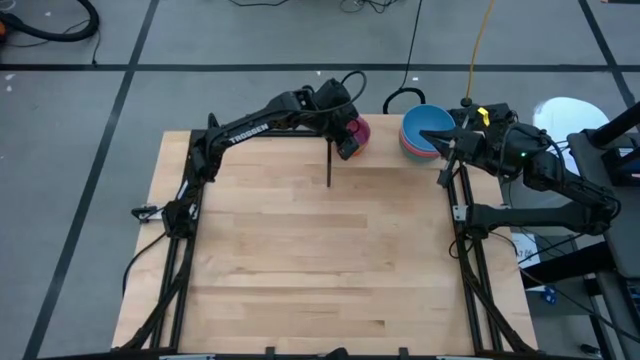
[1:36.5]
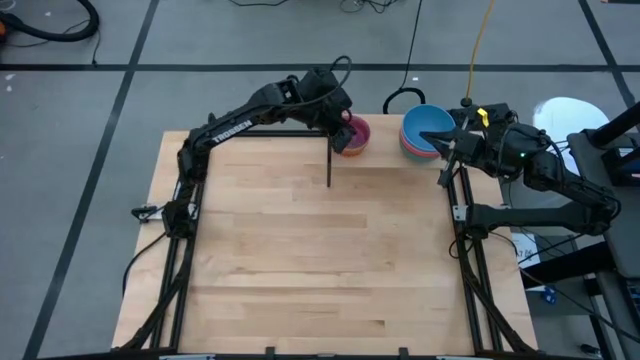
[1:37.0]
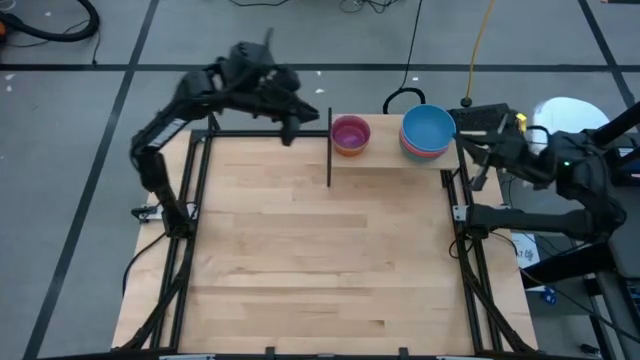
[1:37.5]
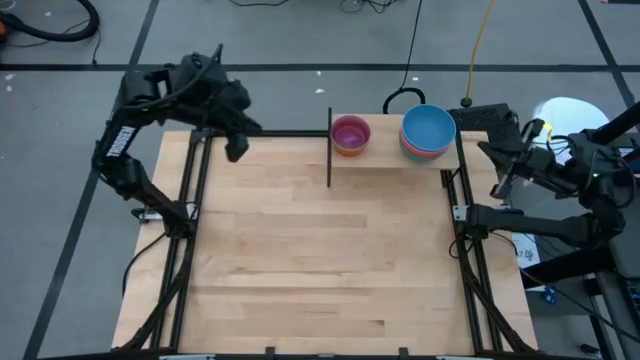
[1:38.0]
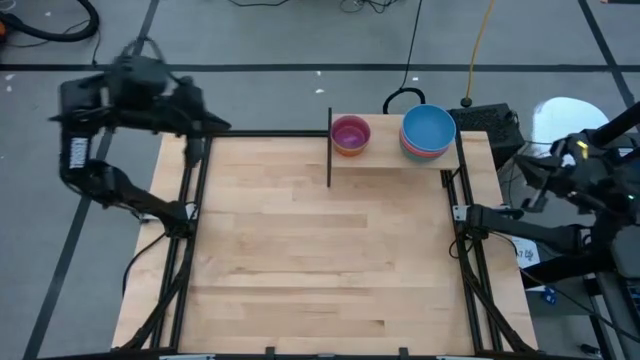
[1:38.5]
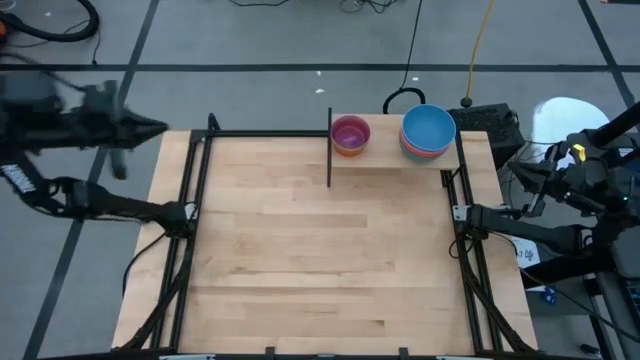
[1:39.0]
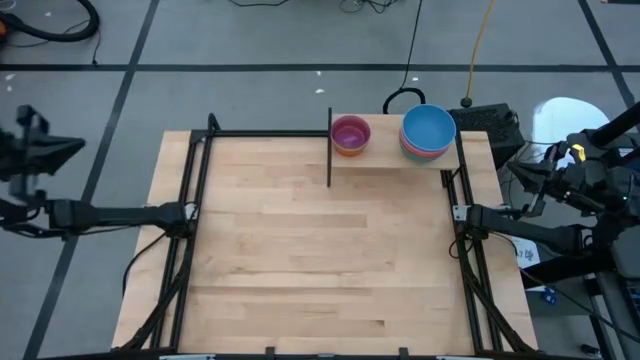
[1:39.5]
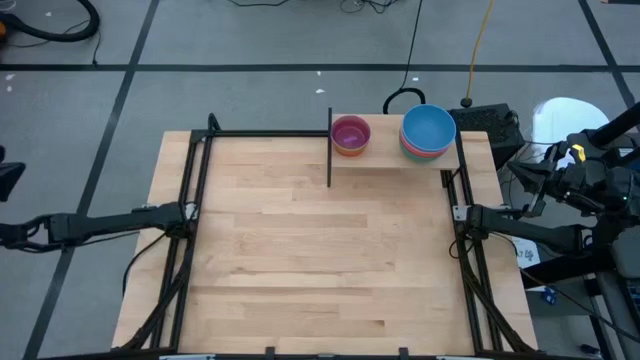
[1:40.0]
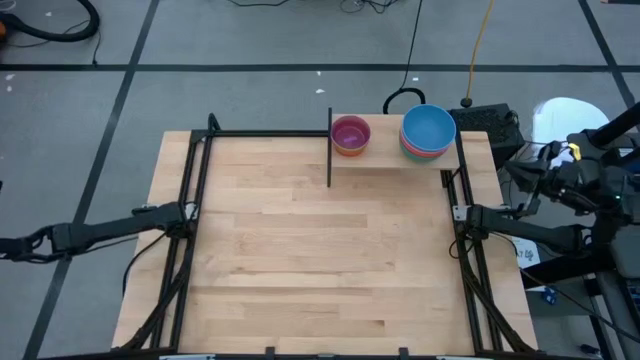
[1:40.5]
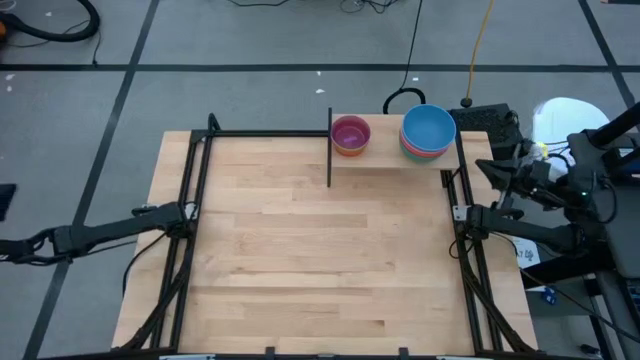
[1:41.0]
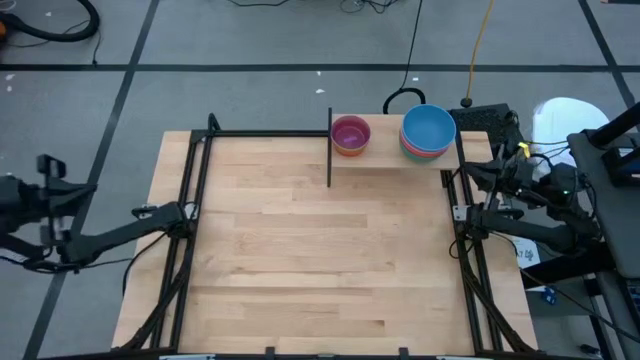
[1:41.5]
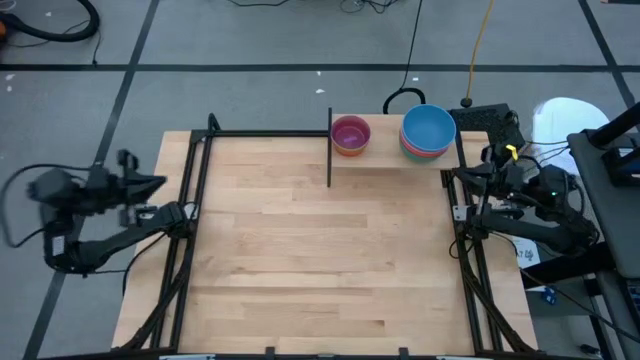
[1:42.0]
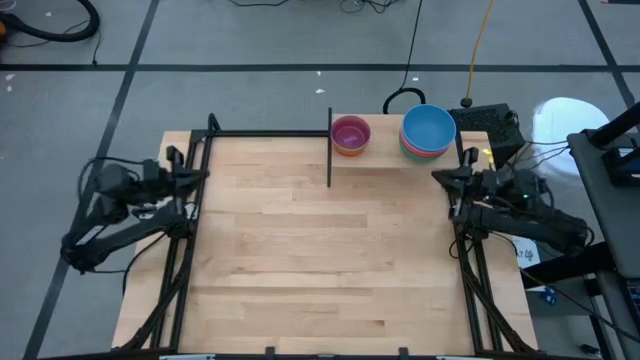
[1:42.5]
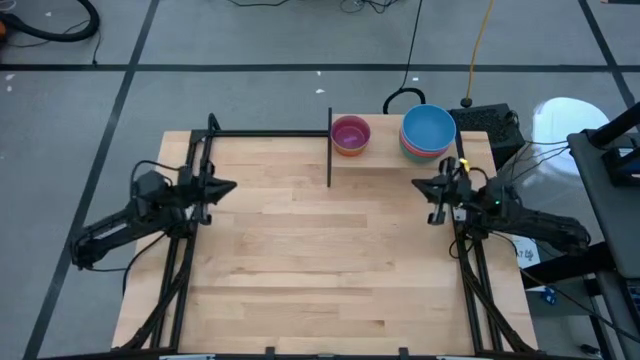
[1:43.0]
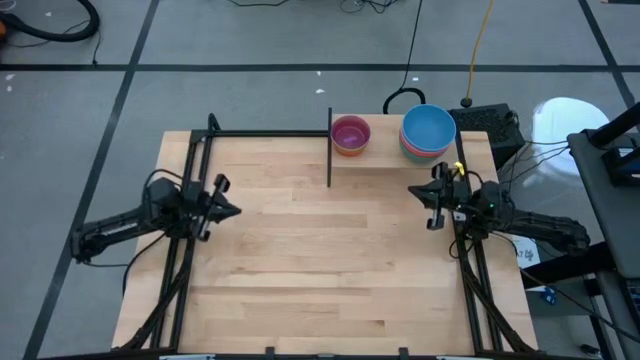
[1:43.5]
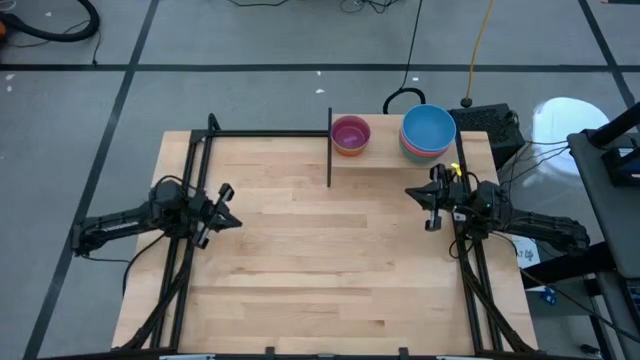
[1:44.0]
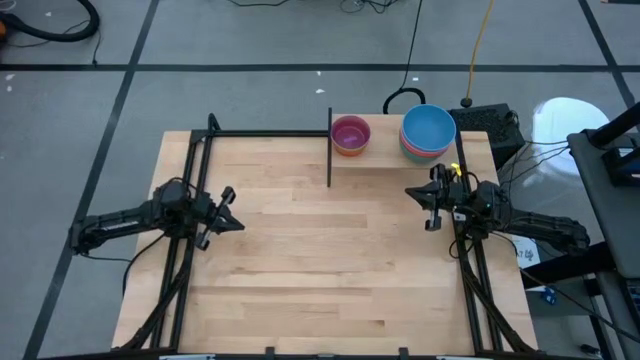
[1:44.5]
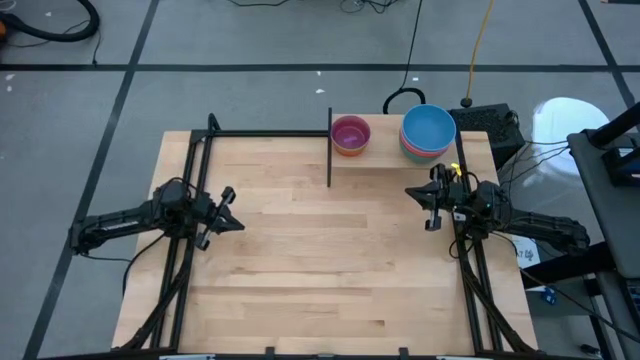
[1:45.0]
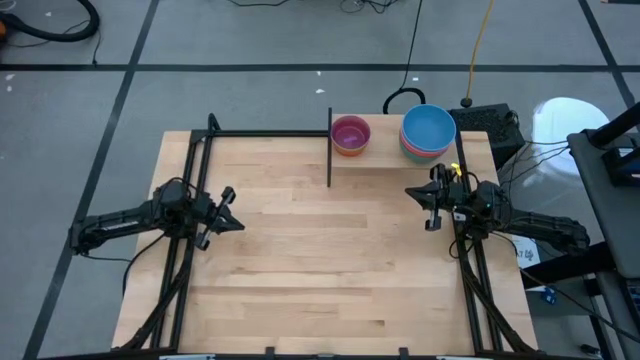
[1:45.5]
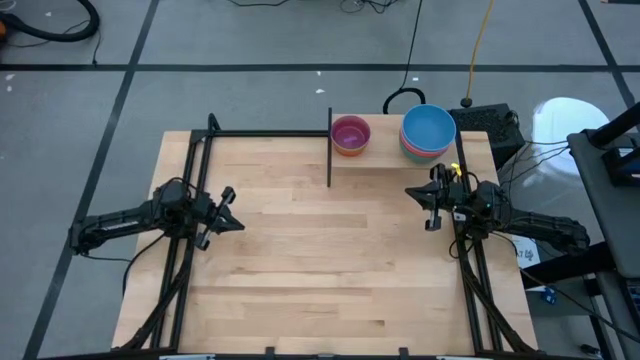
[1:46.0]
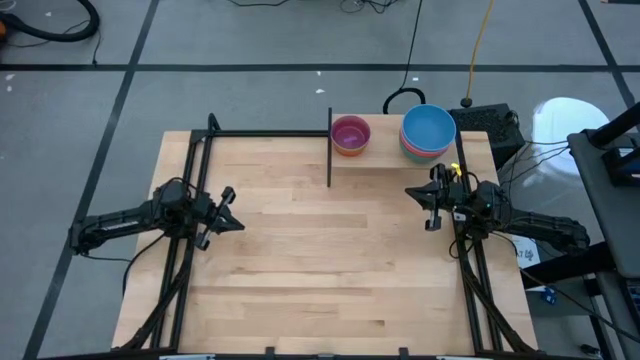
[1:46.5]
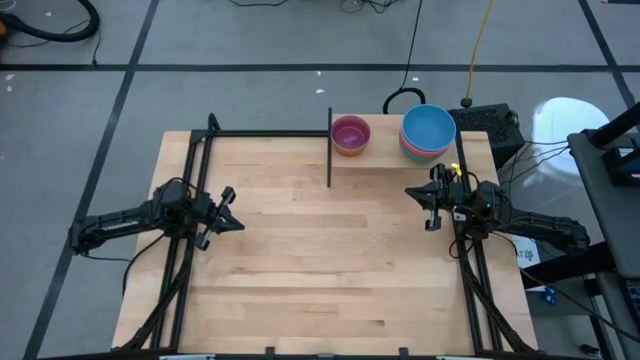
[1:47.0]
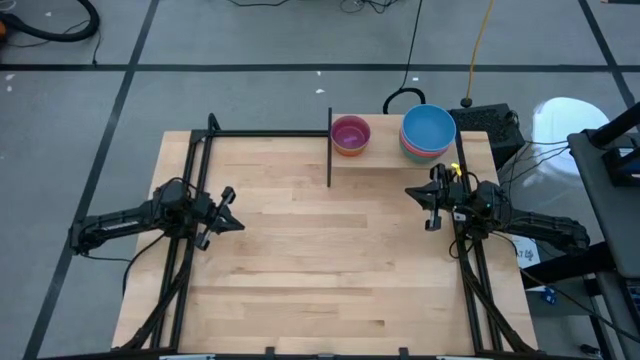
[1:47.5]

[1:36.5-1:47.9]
Task: Place and stack bowls onto a shelf
Return to Home Position

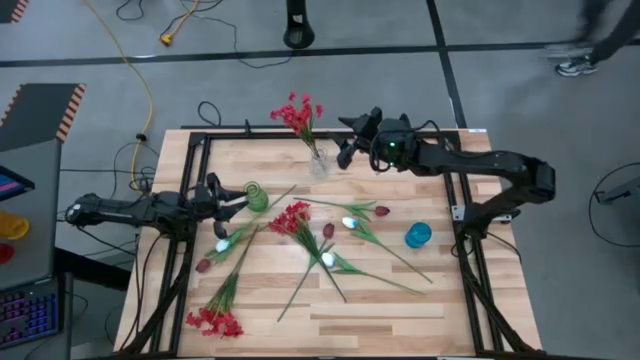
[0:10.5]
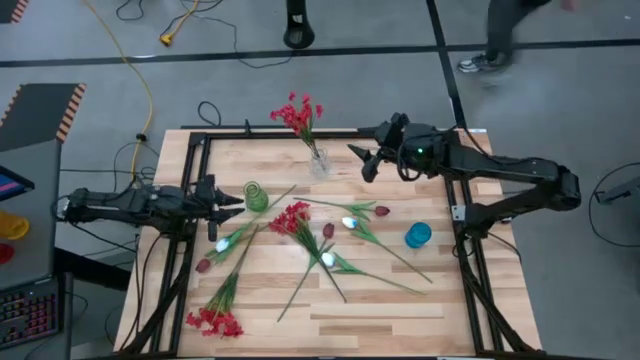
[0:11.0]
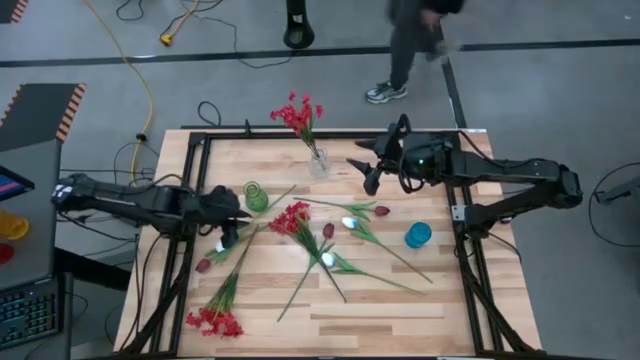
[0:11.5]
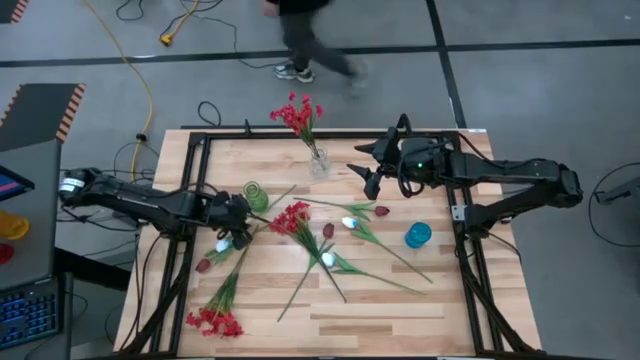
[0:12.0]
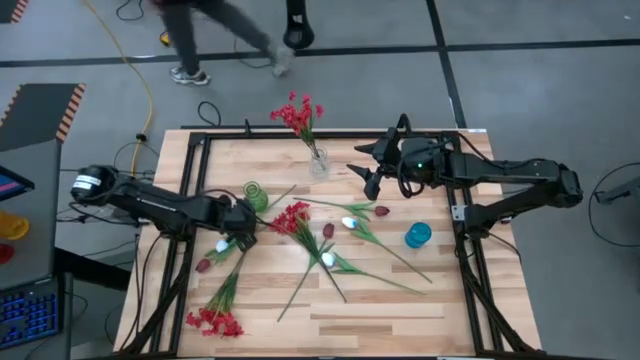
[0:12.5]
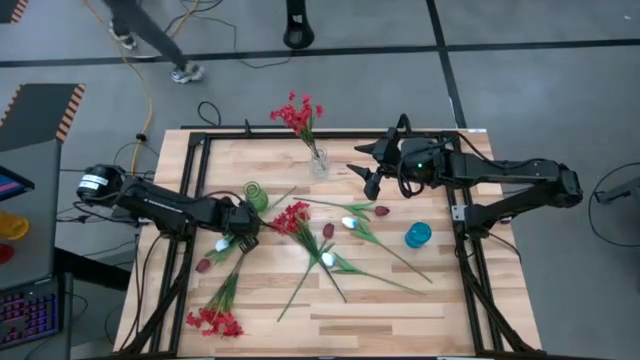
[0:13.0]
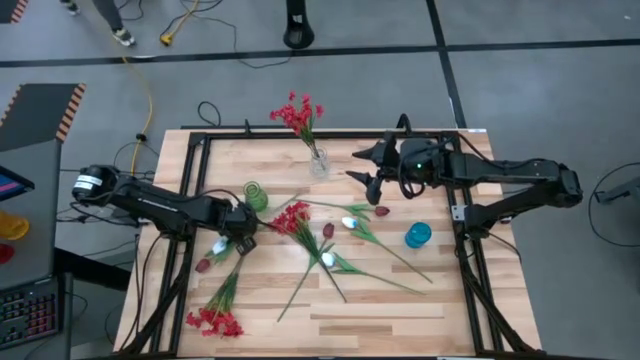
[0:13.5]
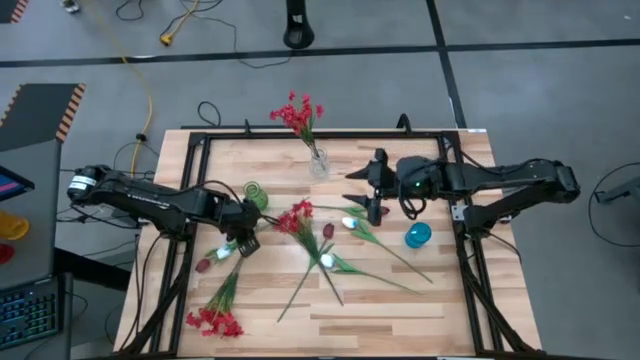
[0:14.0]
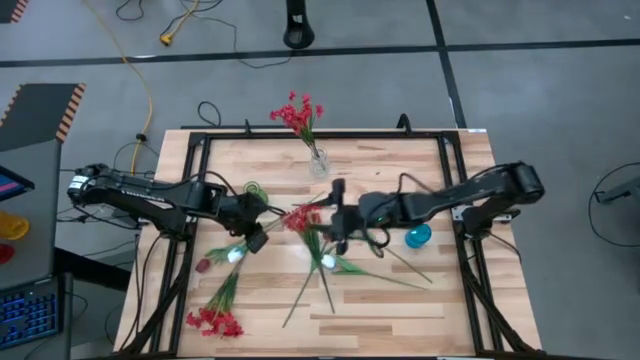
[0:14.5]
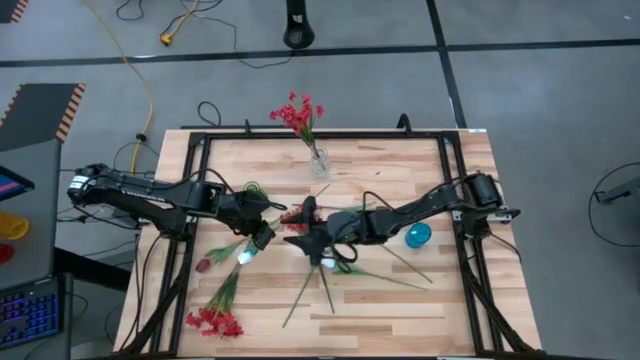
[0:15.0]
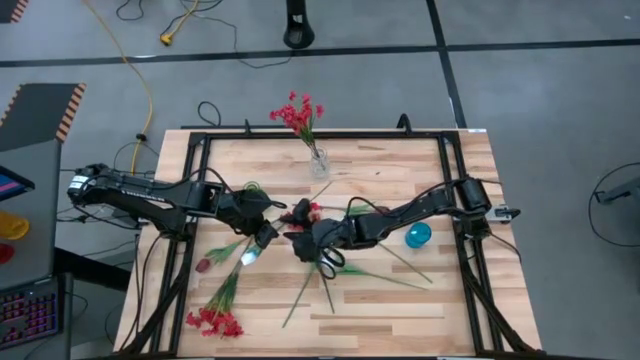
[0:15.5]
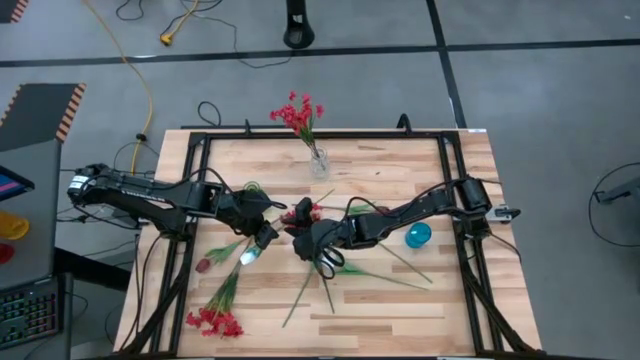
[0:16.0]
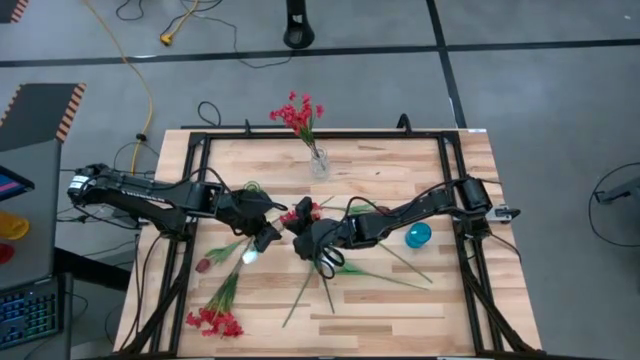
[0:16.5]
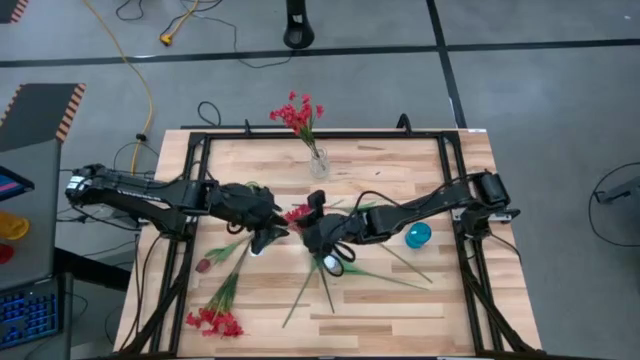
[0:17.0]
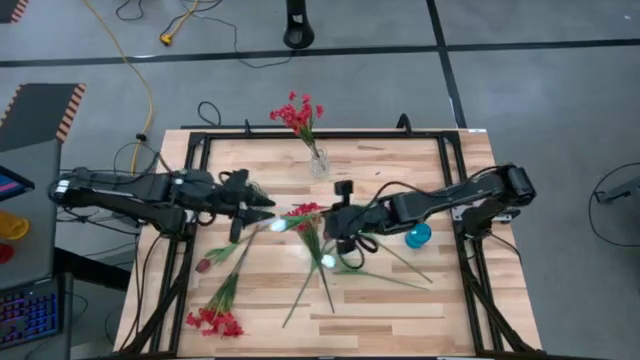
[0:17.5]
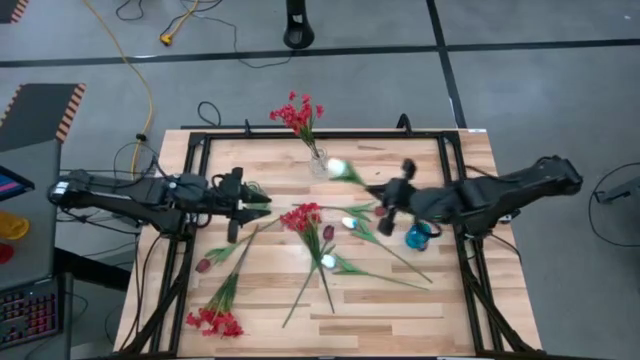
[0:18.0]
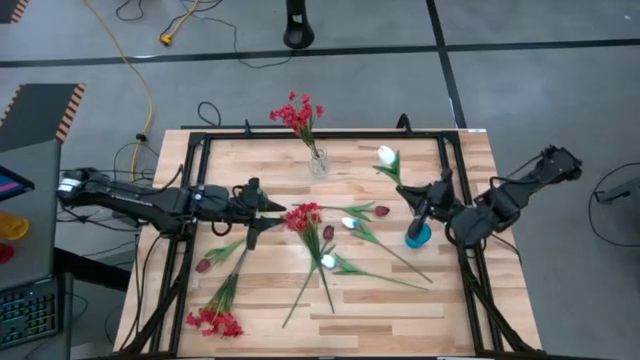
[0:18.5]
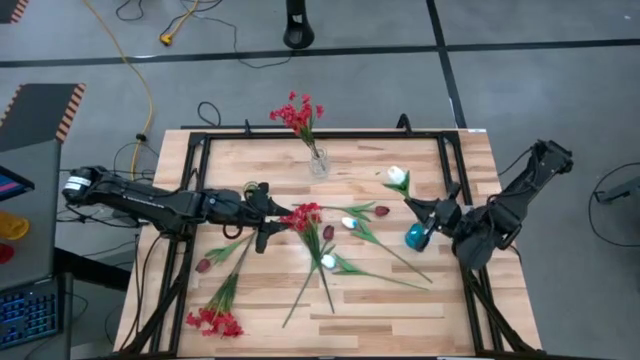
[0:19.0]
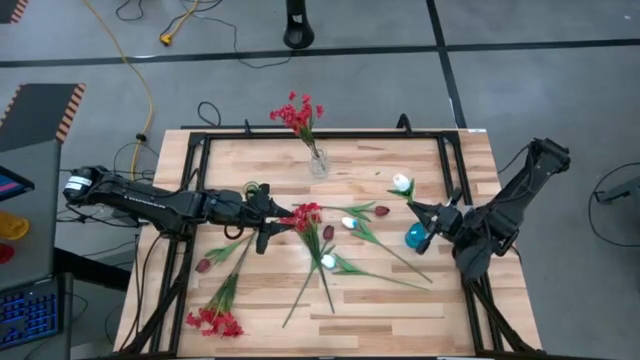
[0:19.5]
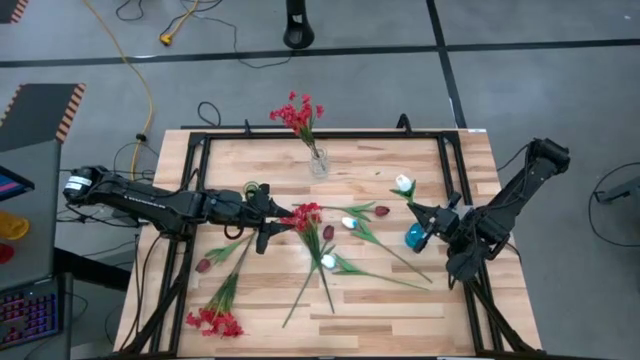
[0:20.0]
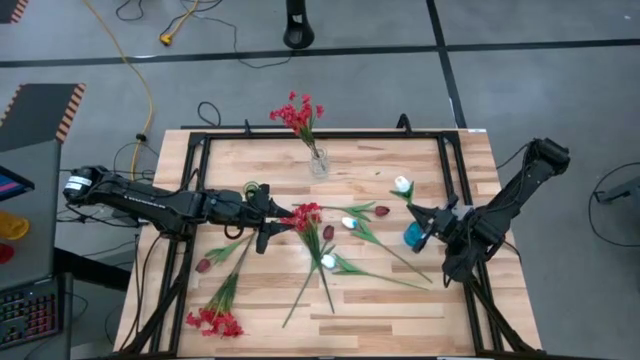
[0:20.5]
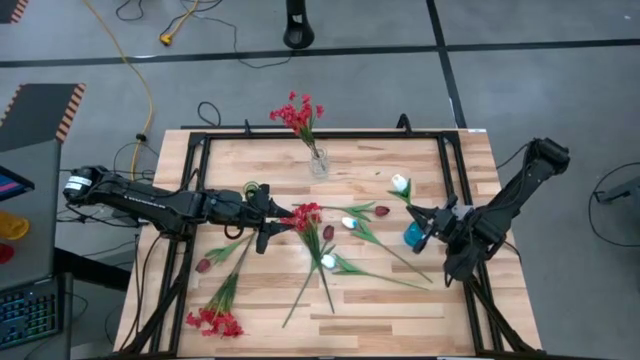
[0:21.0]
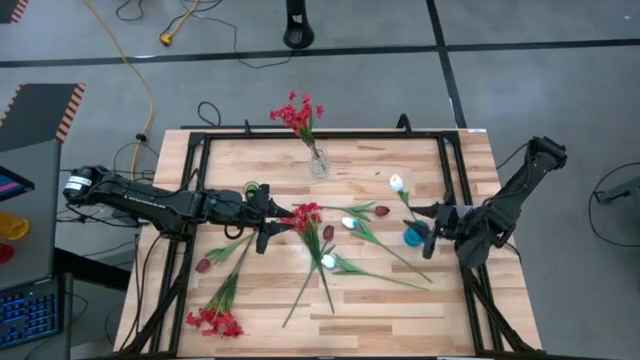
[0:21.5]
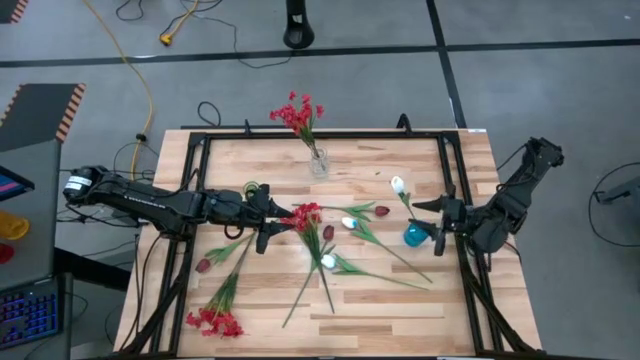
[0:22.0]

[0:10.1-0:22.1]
Task: Sort flowers into vase by color
Put the top left white tulip into the blue vase
